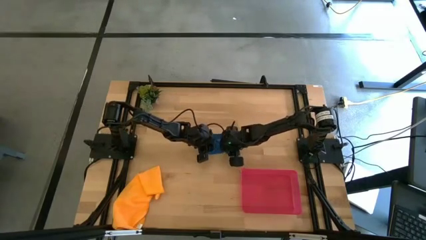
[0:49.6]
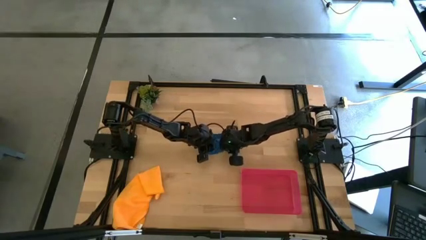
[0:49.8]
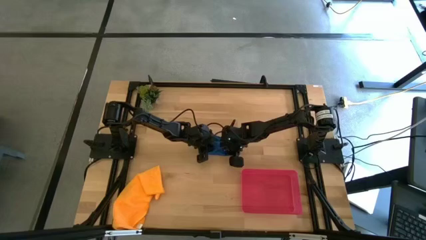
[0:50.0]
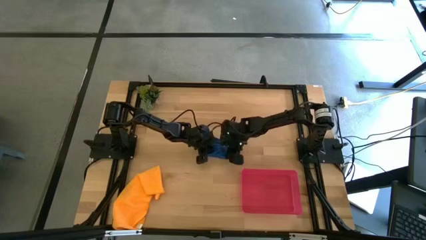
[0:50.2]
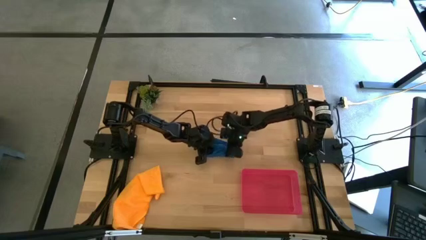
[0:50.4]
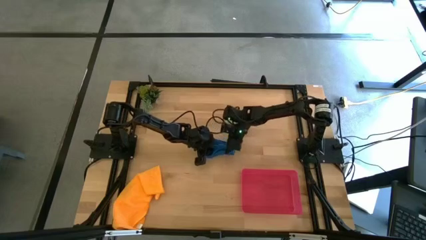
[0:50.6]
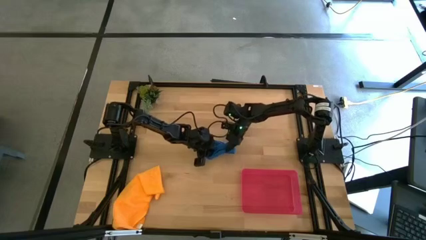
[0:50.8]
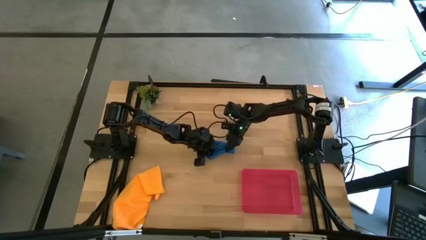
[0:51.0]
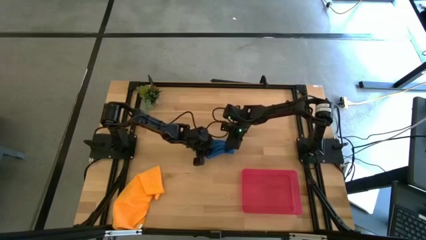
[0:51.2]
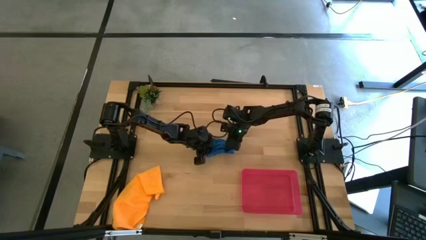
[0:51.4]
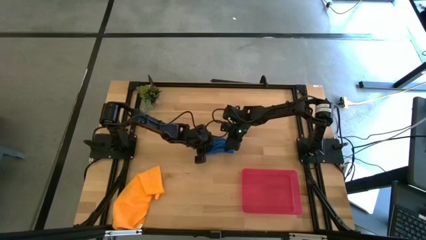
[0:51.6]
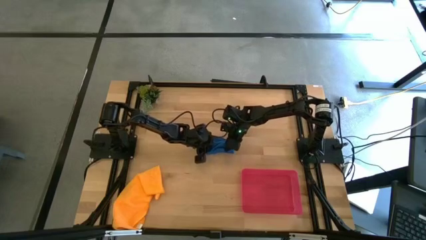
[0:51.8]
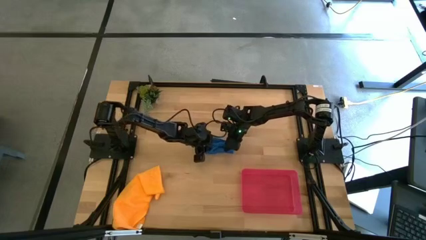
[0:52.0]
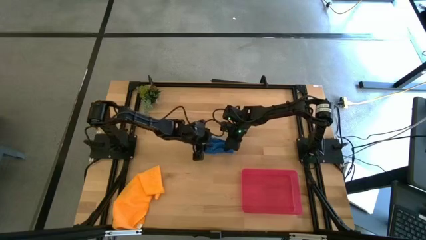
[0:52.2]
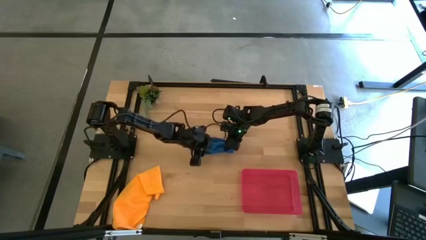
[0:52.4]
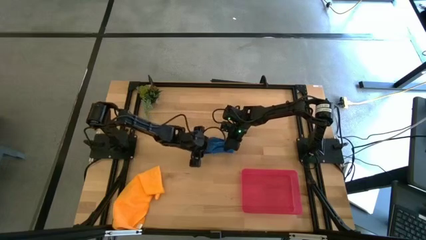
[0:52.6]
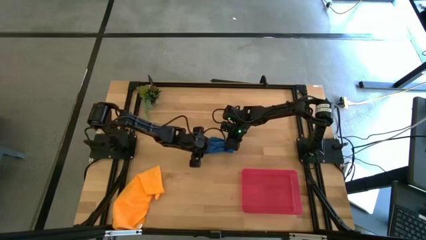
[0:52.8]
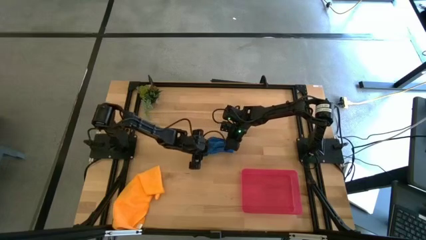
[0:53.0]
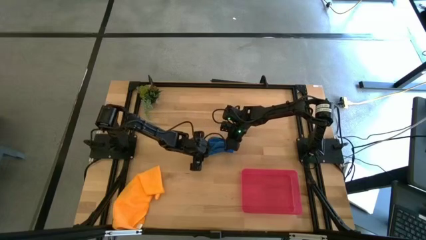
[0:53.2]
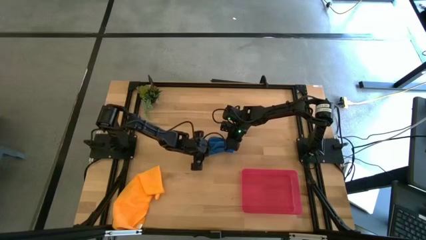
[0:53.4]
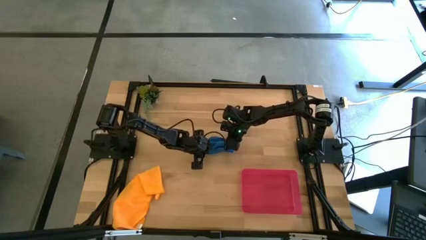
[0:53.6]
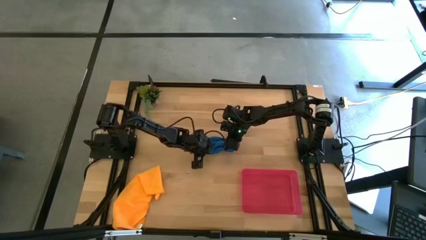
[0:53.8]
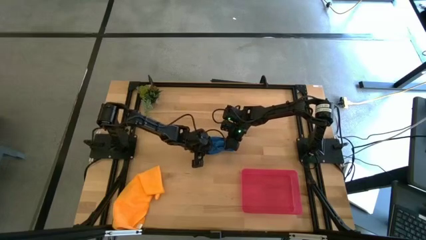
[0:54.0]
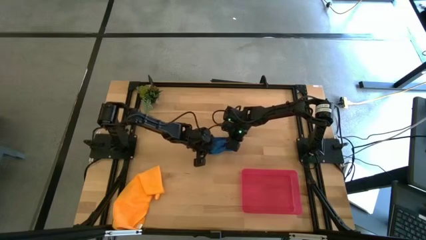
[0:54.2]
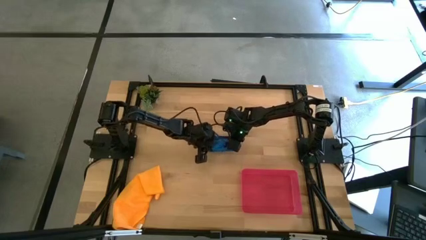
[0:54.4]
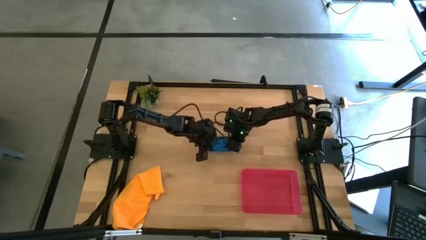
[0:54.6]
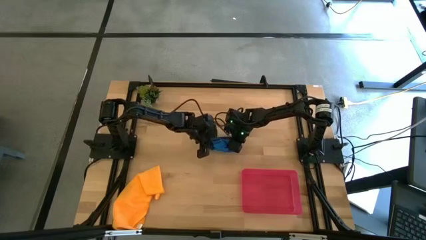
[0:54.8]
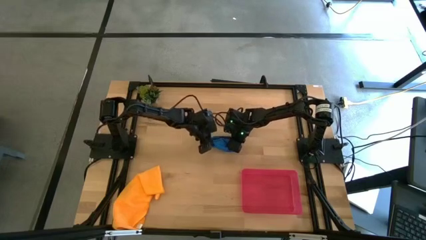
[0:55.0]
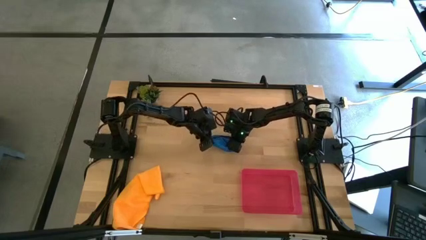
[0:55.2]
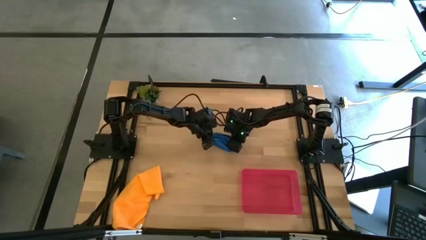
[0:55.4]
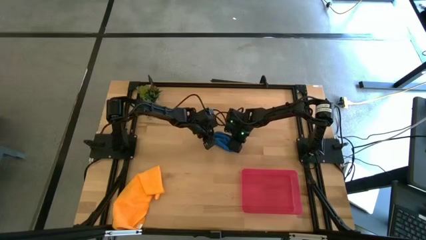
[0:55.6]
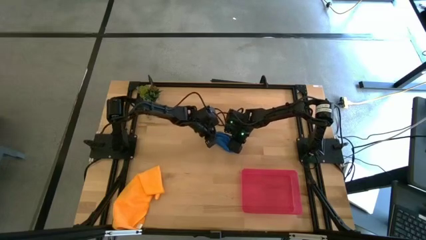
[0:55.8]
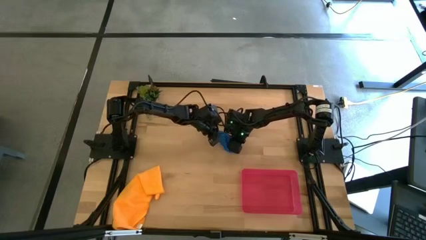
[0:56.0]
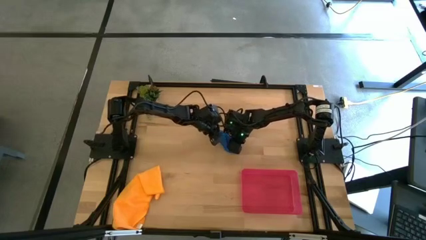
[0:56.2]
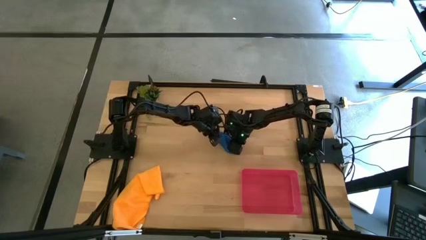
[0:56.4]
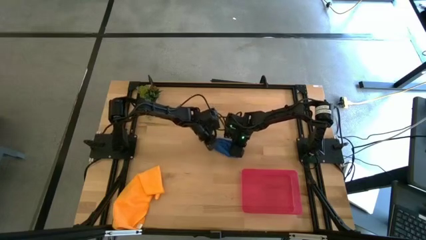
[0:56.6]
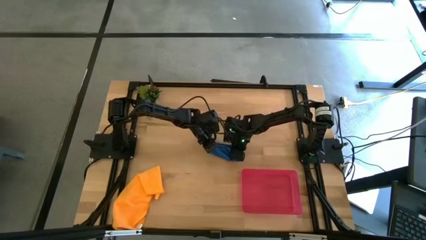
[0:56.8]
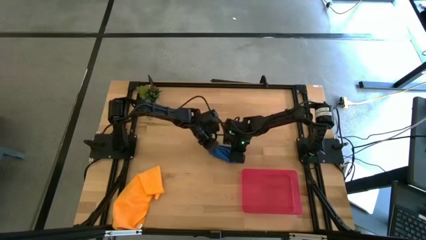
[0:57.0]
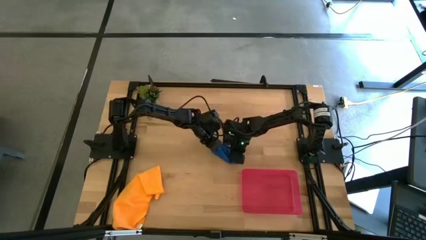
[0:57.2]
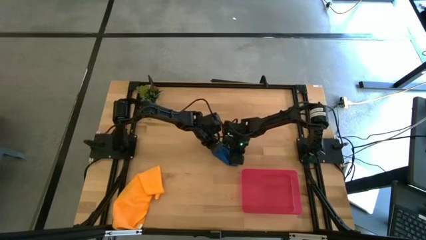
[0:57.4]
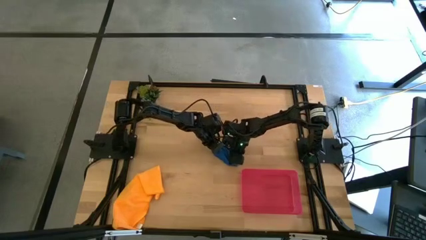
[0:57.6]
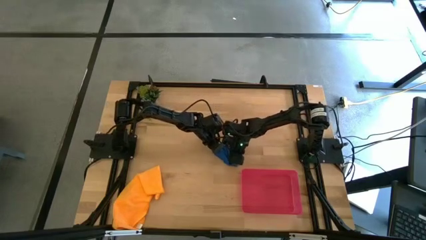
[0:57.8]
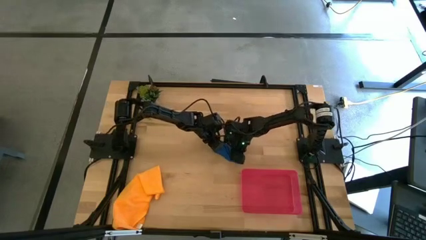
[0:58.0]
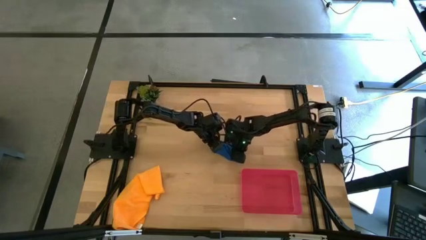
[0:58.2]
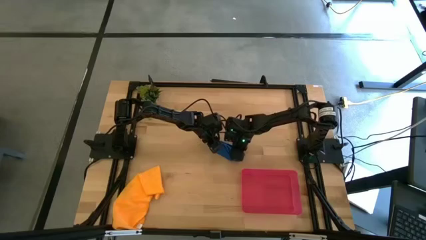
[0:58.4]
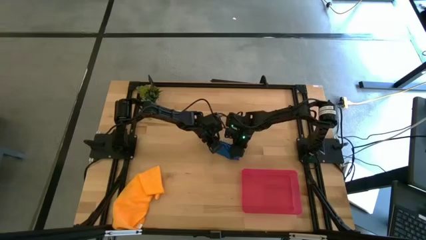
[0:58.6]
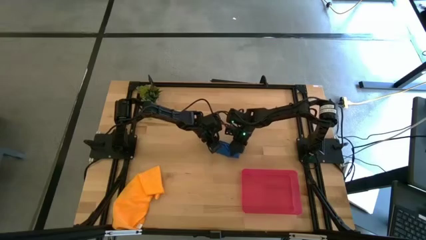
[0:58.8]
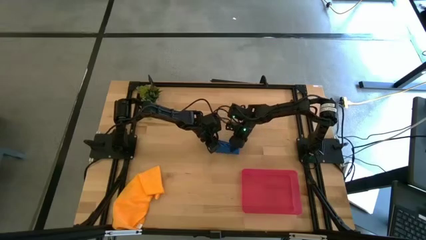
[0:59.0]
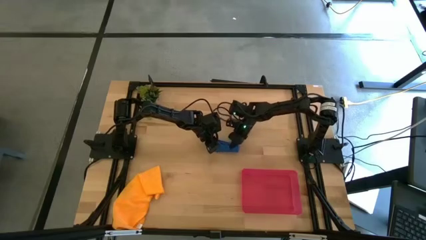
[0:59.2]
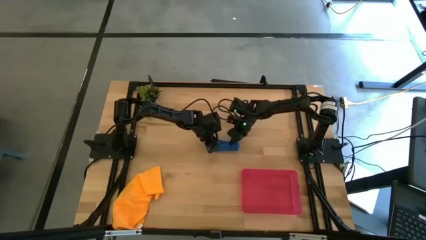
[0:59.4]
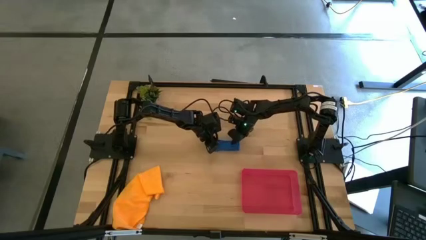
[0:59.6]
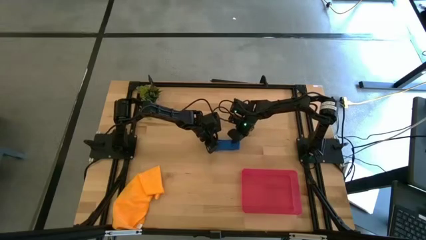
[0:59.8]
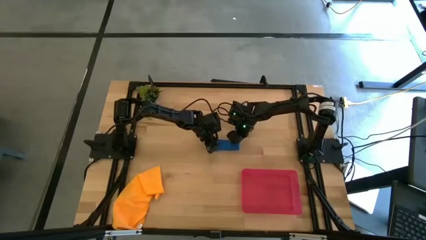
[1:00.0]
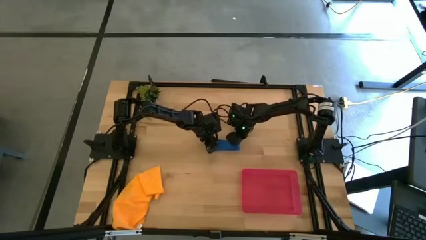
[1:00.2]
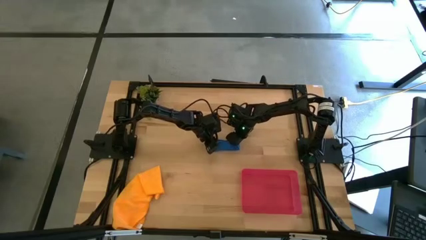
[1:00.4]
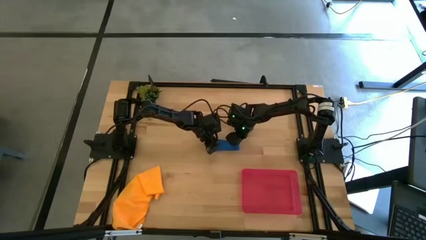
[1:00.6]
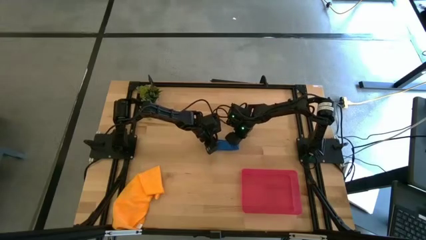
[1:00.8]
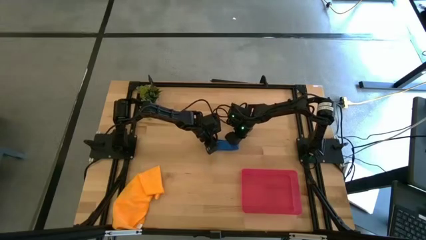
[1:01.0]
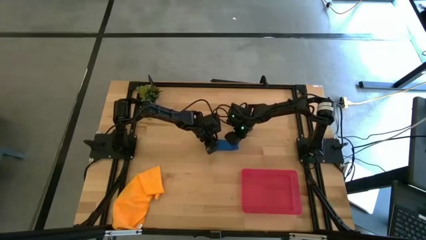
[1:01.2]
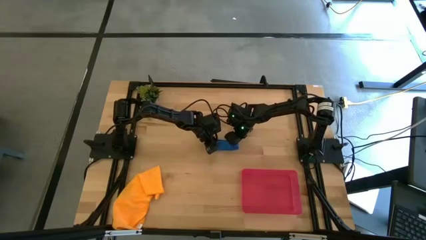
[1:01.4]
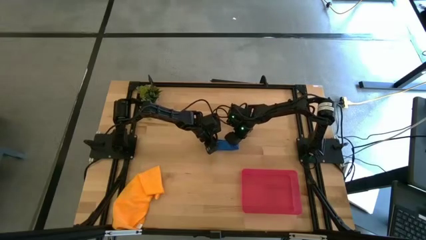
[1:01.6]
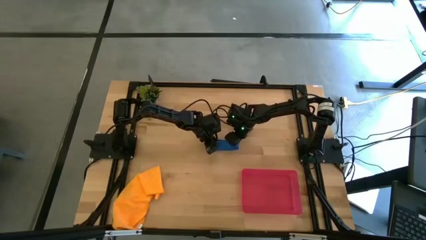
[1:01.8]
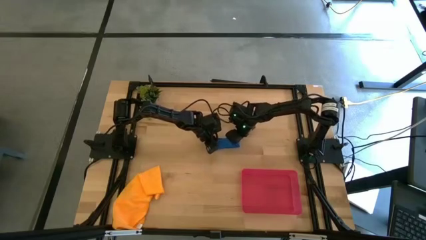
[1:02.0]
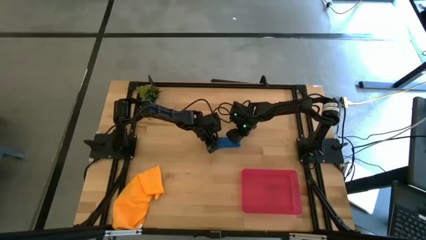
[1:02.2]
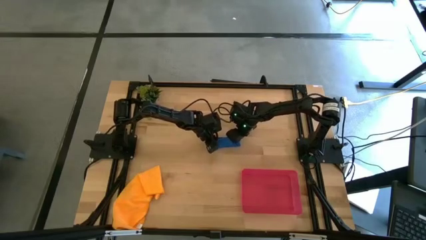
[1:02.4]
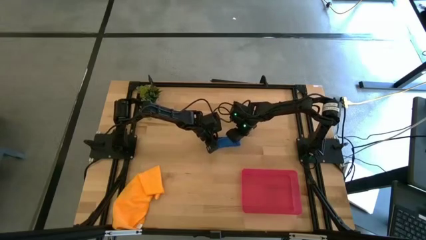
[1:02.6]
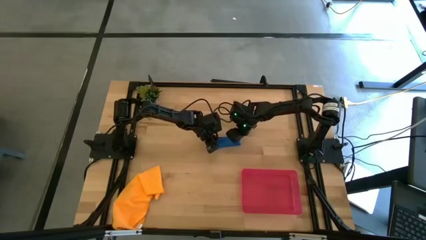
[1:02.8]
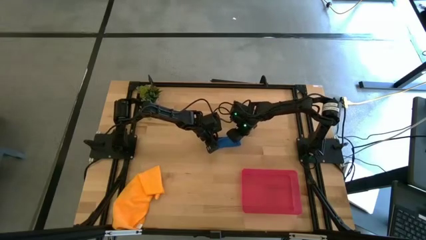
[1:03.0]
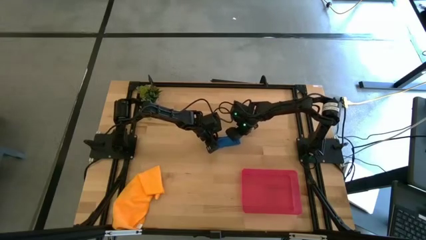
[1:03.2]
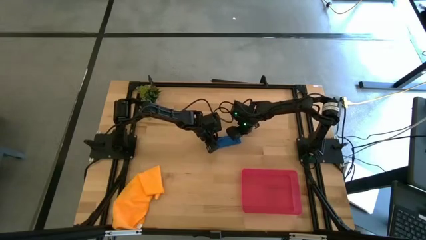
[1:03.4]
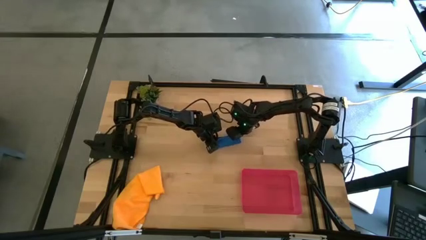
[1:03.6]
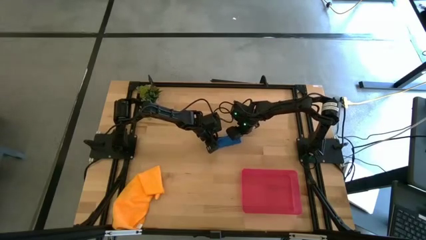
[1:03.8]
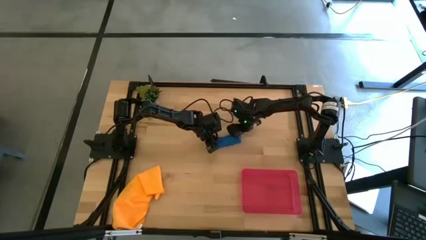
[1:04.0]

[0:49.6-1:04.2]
Task: Roll microfiber towels into tight, uniform cylinder then place into a basket
Roll the blue microfiber towel

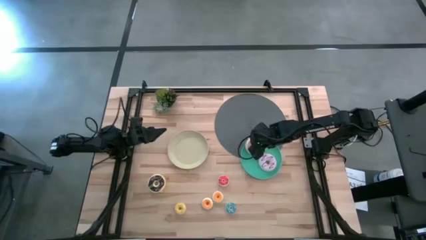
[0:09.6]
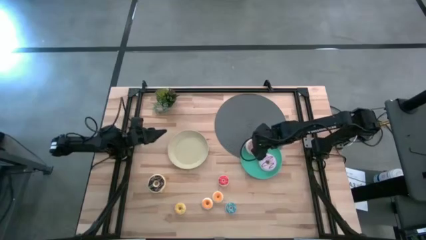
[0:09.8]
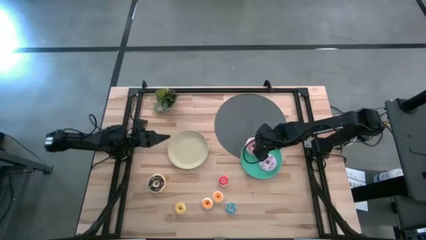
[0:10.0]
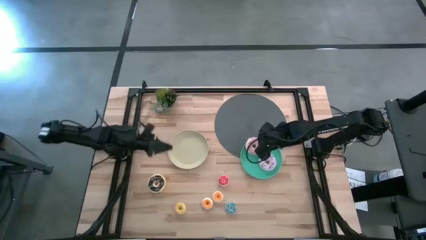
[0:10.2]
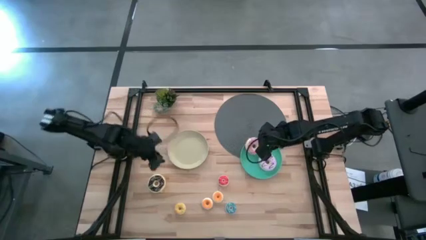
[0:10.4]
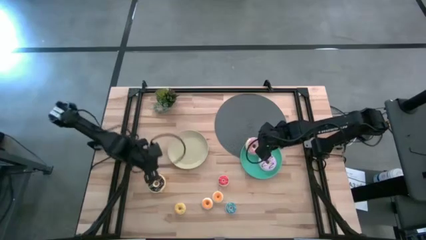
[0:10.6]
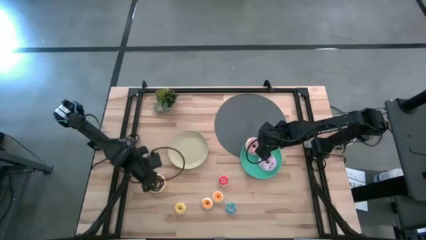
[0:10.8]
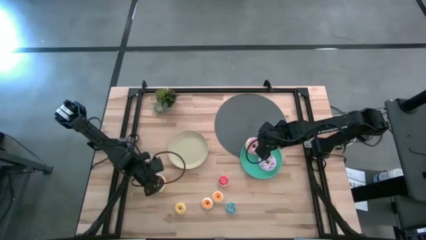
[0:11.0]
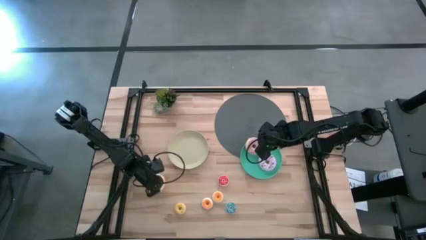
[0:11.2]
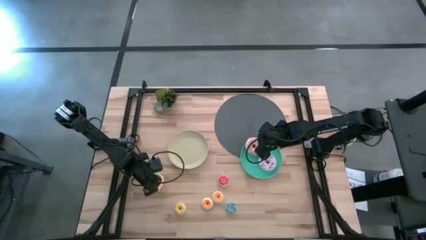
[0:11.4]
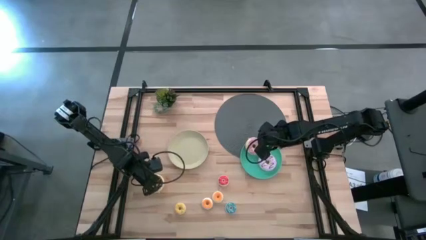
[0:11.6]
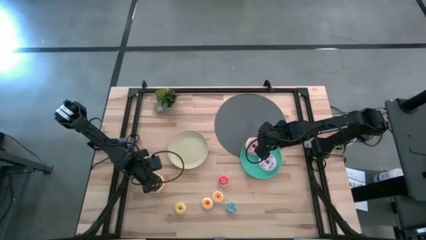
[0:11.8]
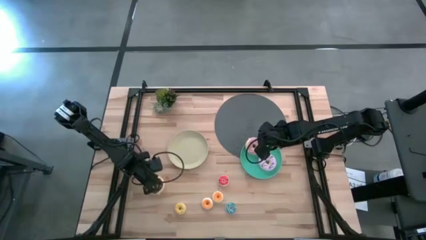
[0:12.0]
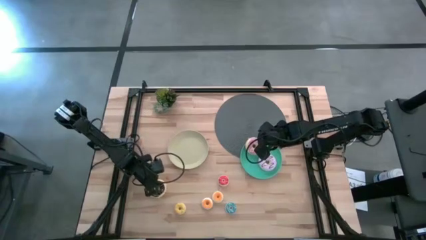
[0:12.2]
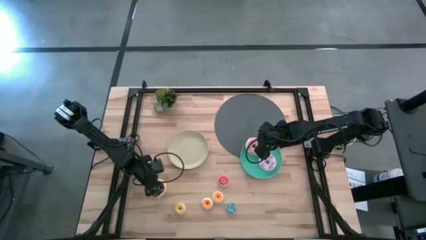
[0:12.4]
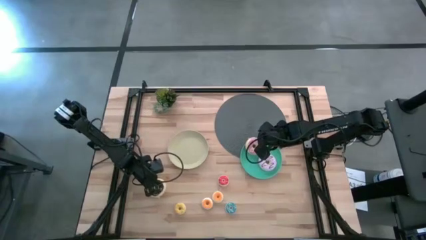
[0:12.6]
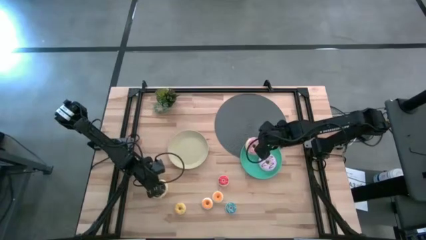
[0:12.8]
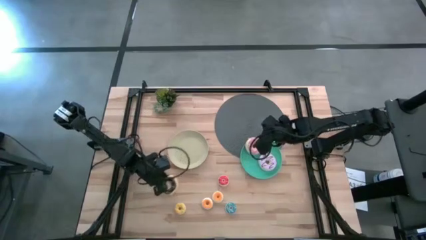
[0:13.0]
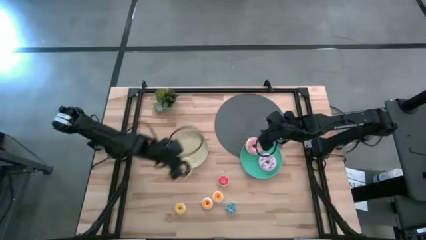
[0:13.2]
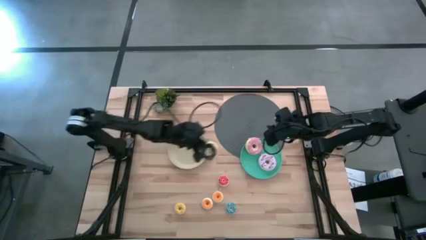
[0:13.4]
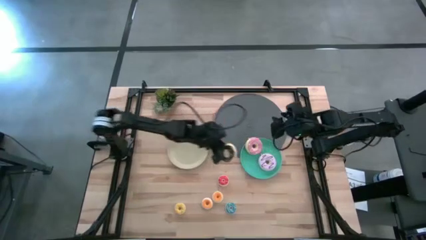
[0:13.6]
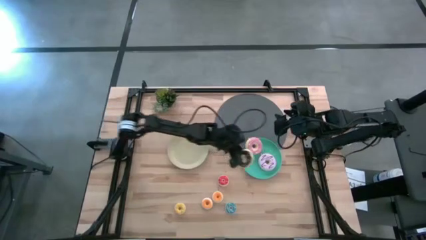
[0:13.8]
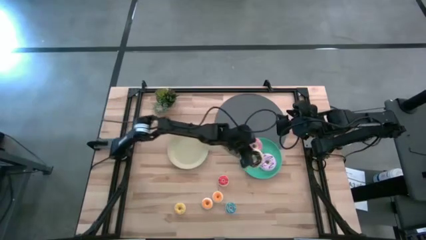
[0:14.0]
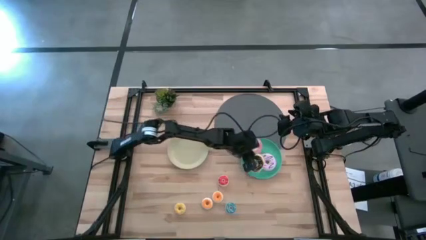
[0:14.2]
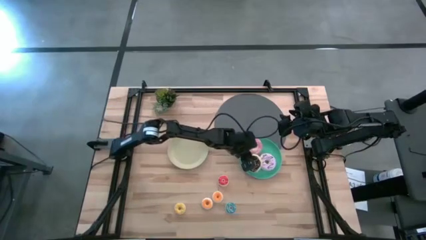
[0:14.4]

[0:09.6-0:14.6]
Task: Pick & Place donuts
Put the large black donut on the green plate
